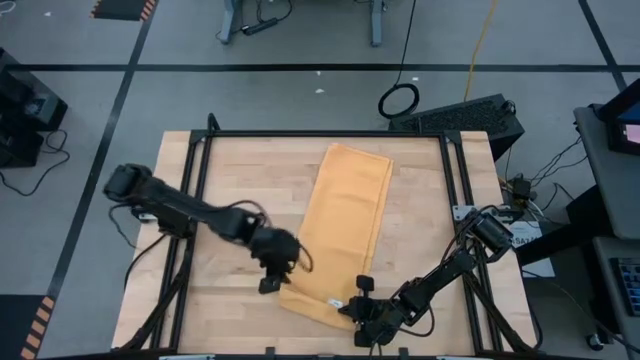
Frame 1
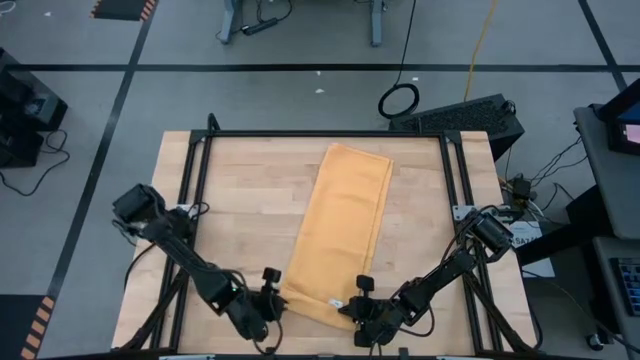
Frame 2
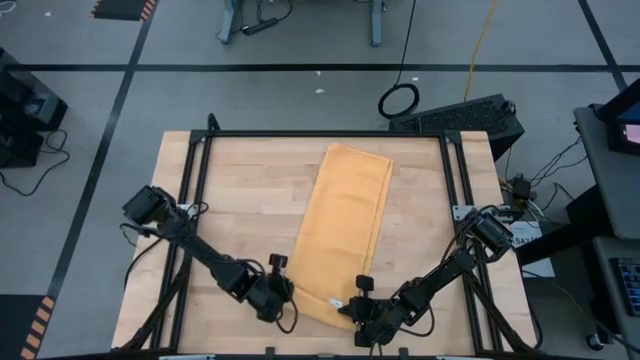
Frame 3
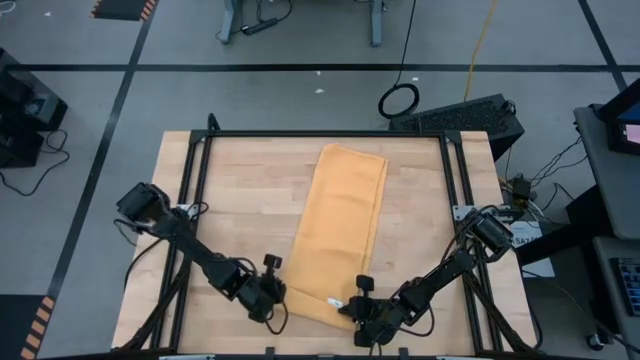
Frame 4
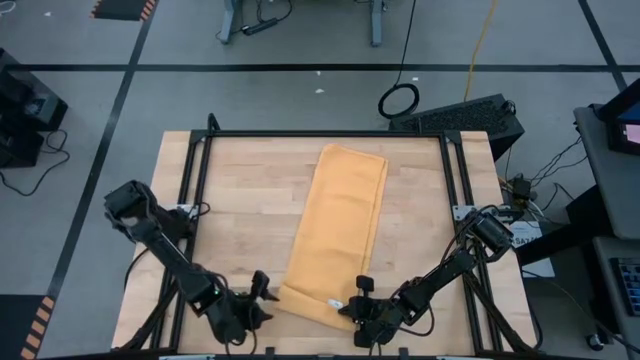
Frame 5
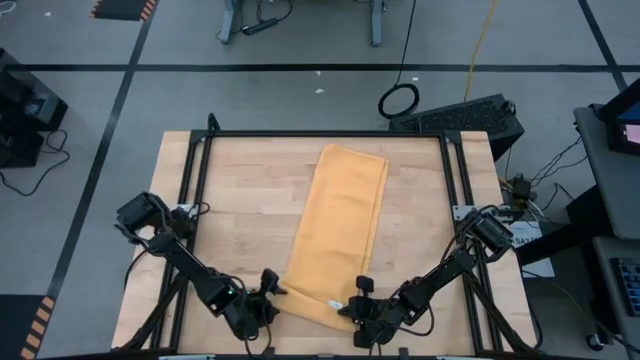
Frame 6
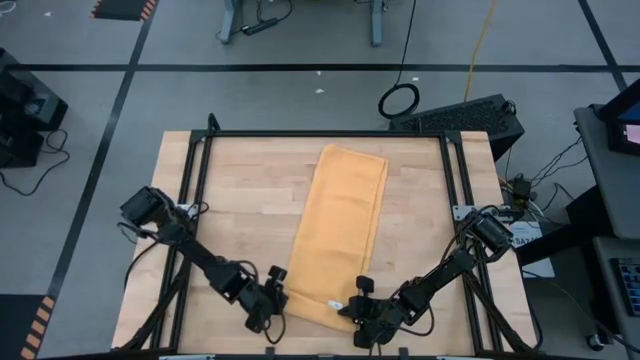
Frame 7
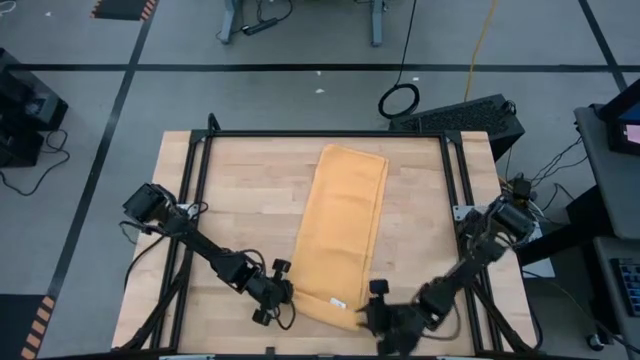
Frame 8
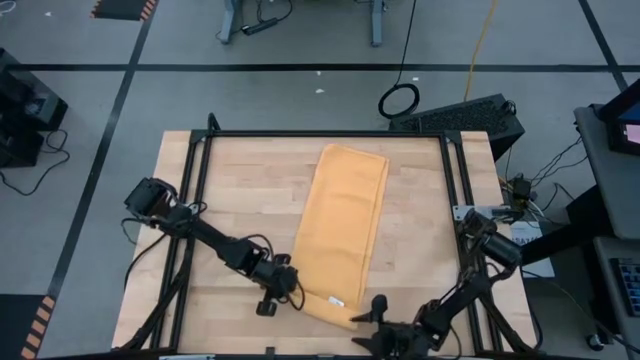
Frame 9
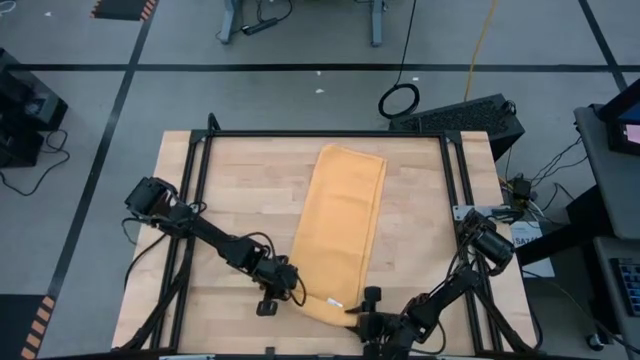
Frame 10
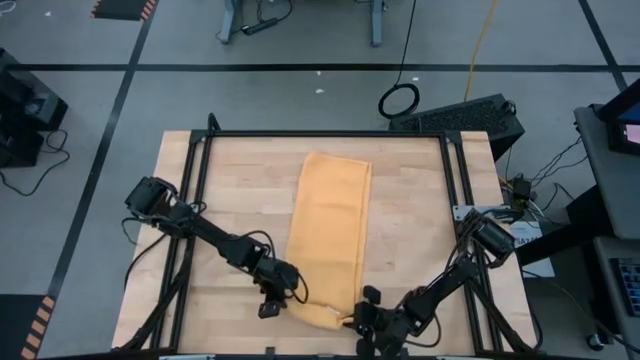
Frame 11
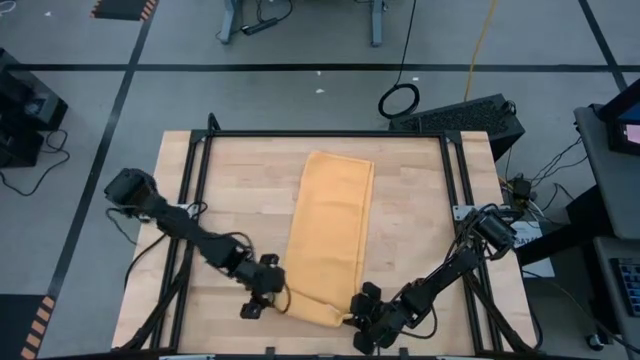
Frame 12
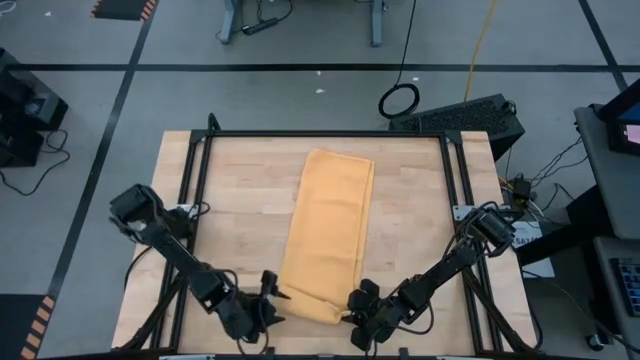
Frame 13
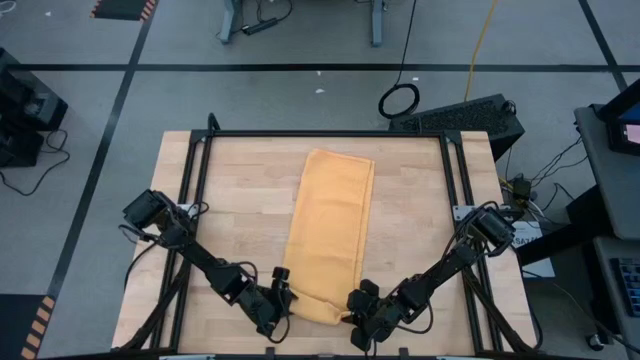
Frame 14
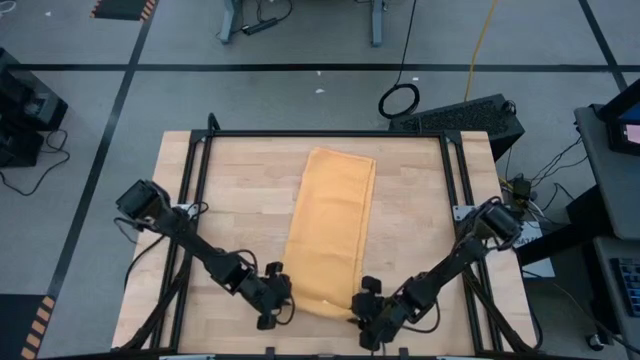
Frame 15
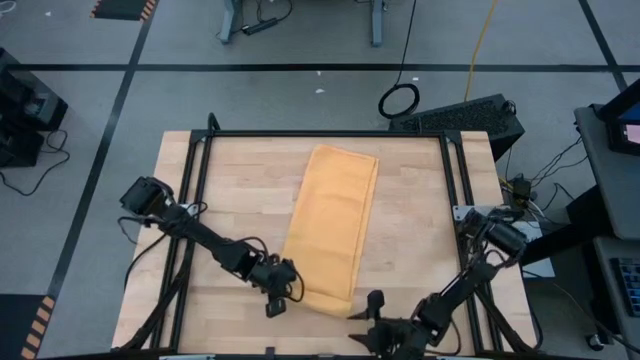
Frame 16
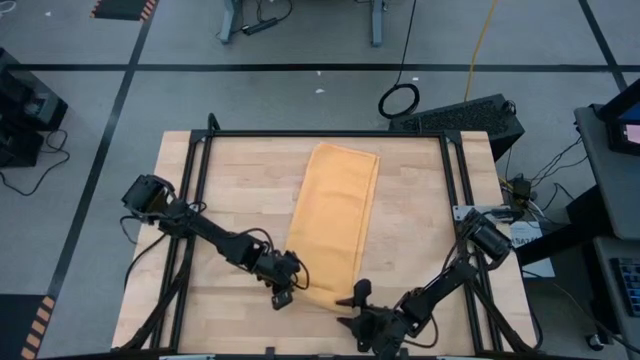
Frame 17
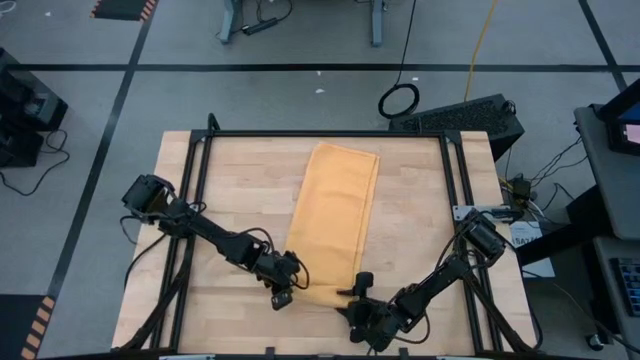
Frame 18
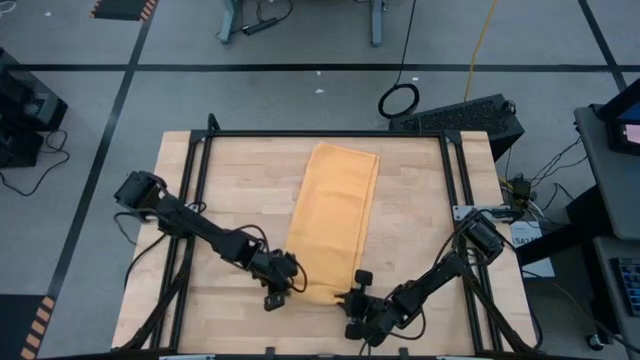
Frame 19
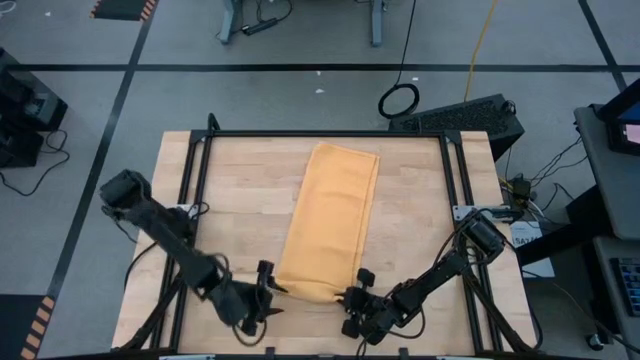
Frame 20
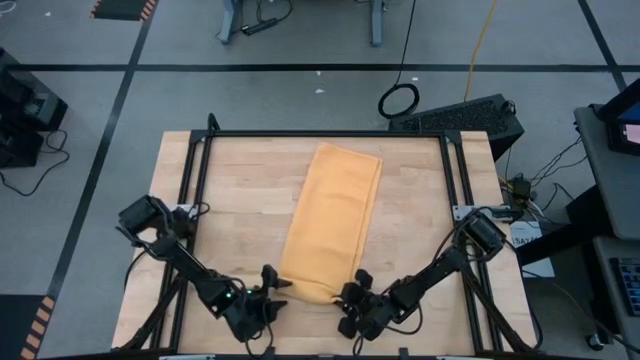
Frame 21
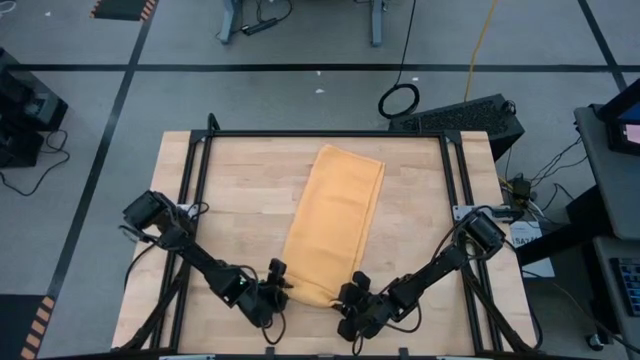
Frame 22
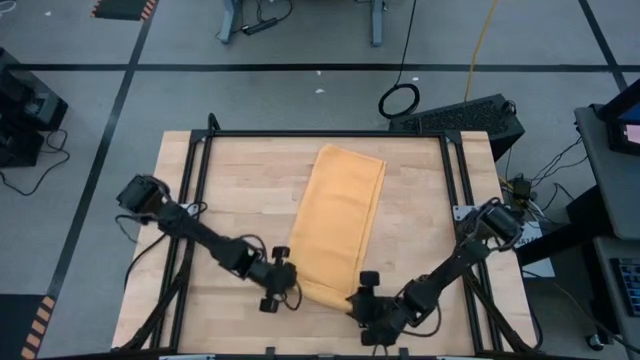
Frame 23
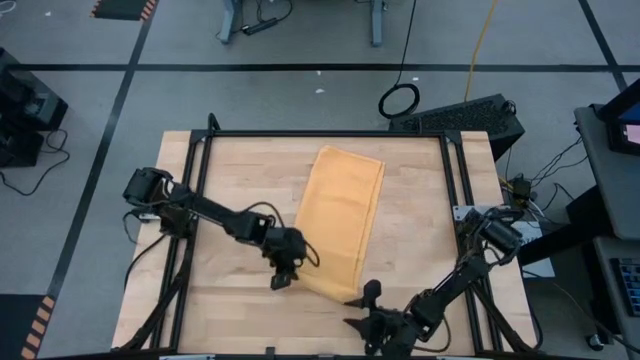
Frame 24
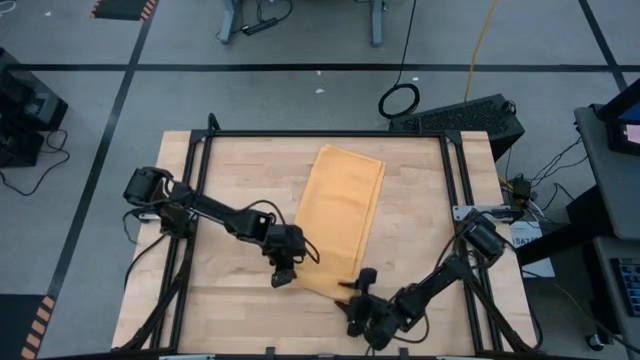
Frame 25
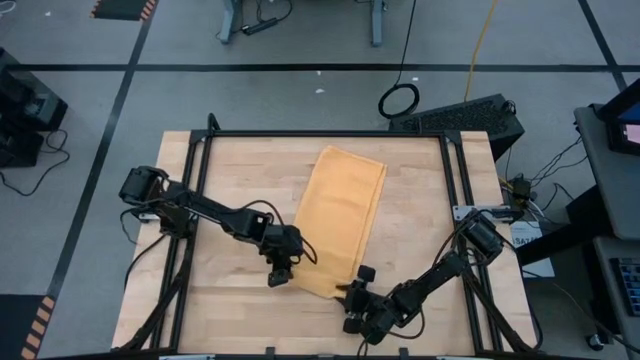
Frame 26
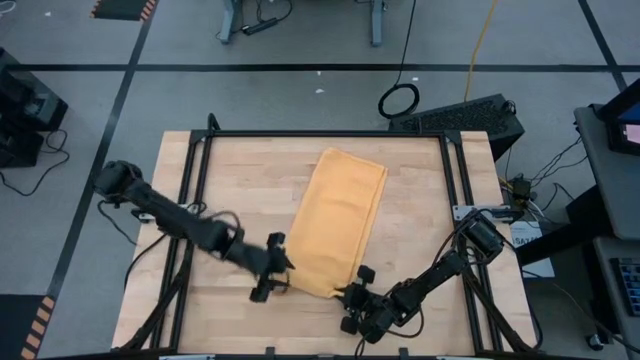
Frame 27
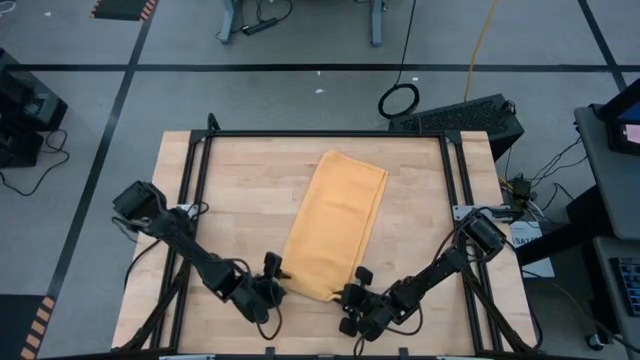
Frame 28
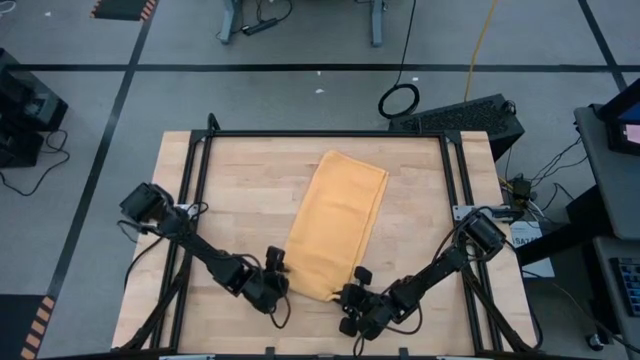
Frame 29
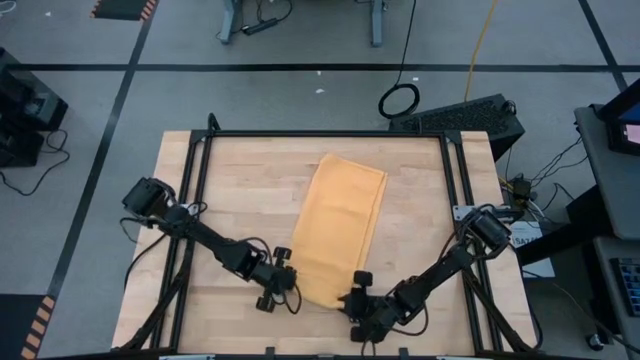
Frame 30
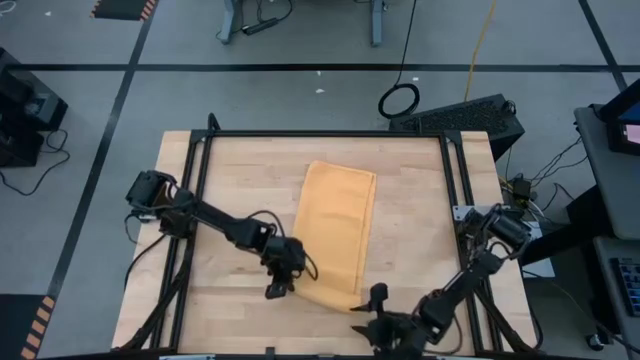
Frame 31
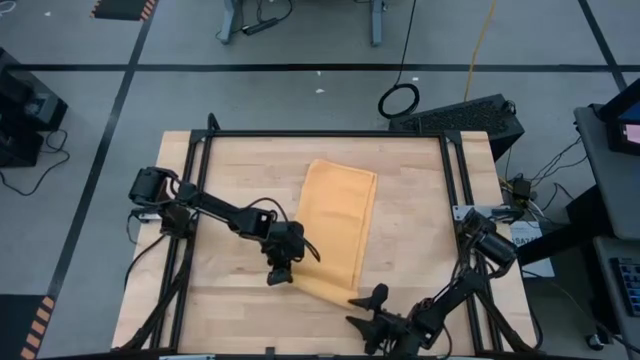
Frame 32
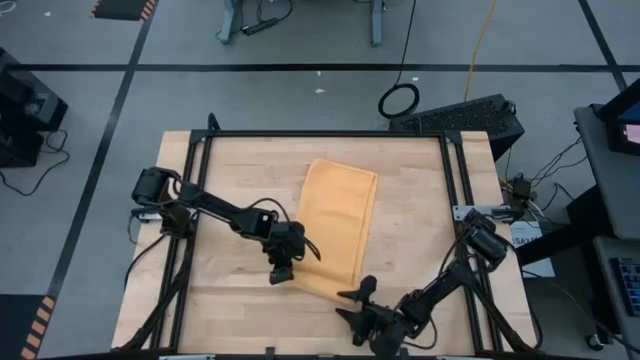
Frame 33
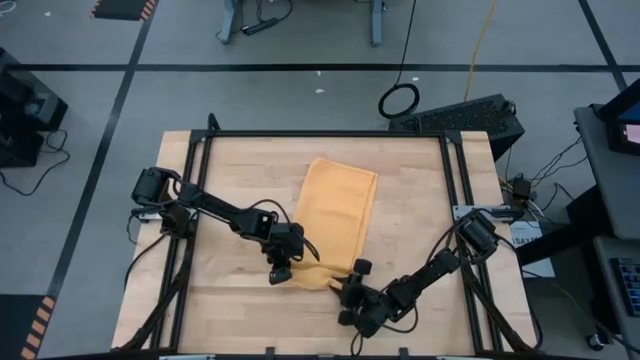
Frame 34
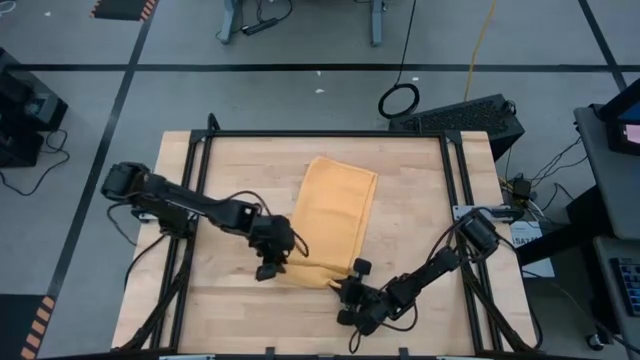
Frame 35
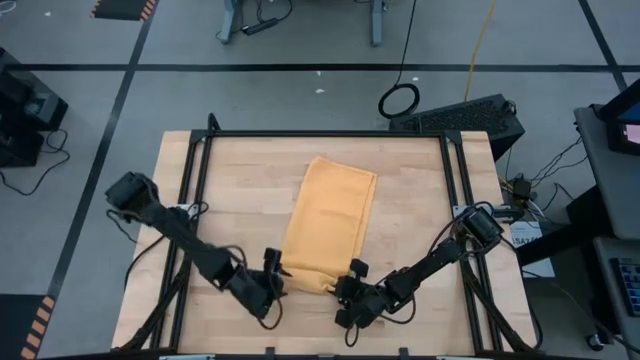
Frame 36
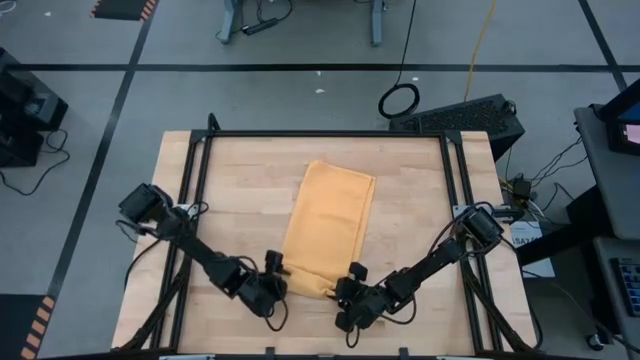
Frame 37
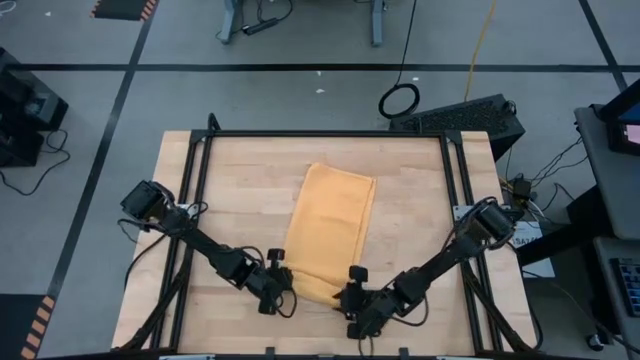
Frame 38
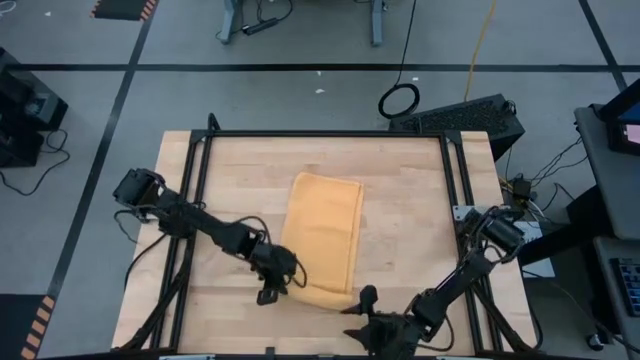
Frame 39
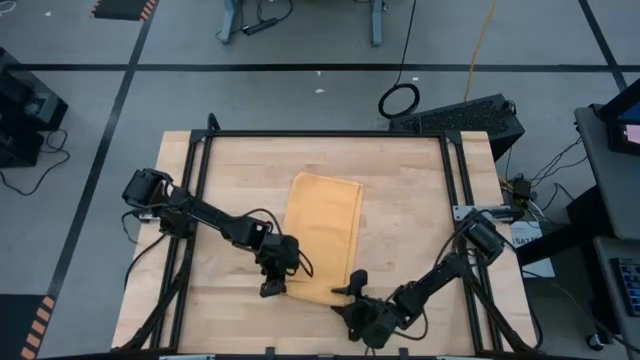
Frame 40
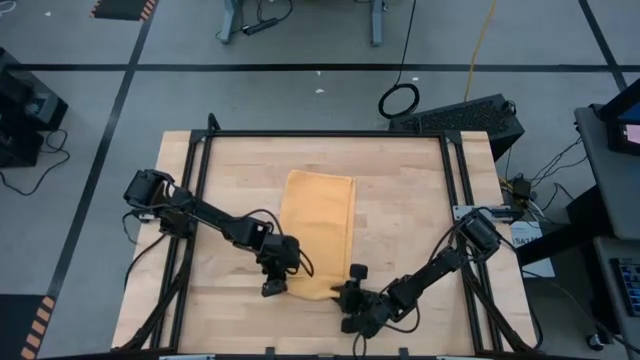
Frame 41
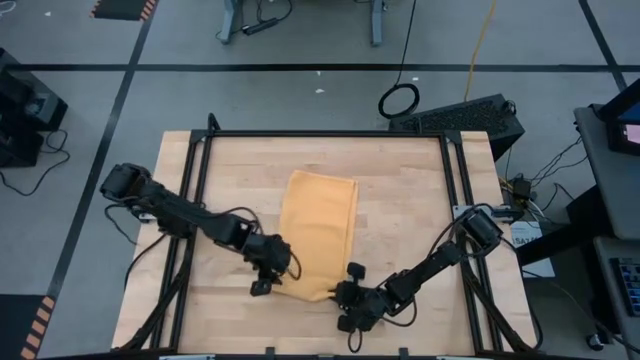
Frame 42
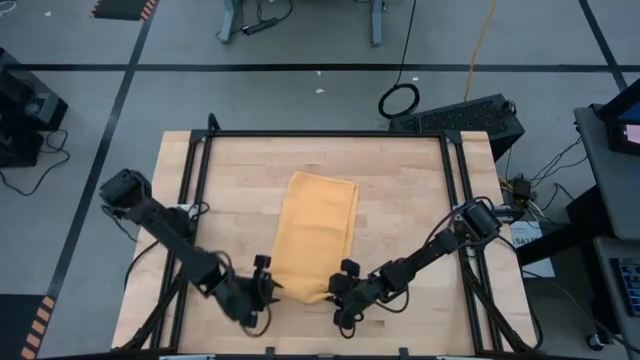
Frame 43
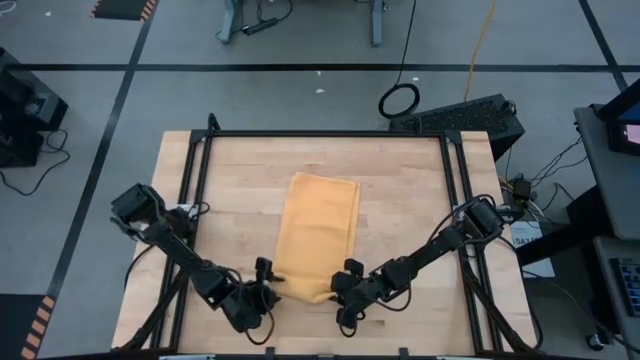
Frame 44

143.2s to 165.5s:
Task: Roll towel
Roll the yellow towel
